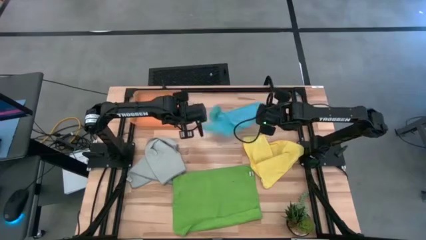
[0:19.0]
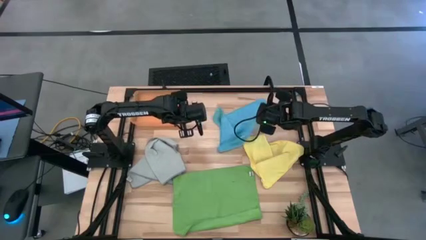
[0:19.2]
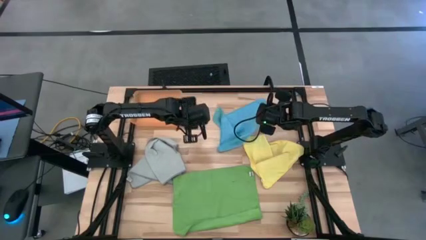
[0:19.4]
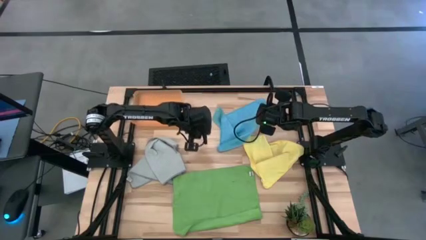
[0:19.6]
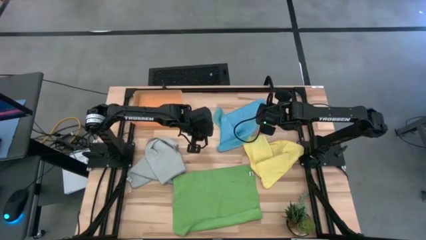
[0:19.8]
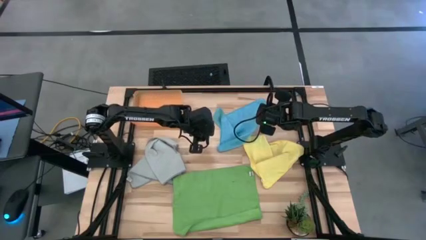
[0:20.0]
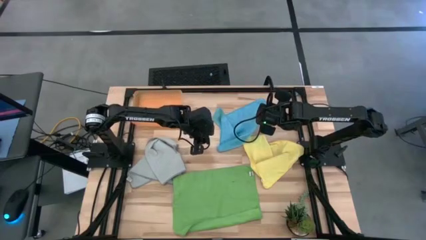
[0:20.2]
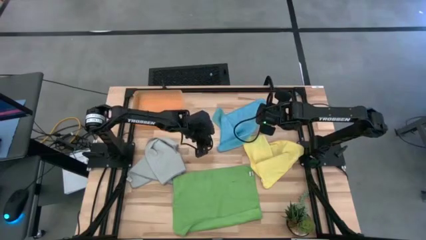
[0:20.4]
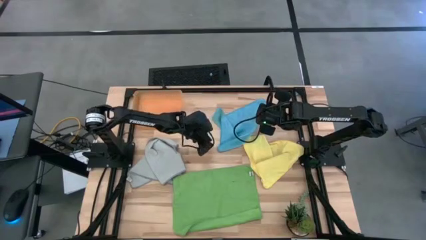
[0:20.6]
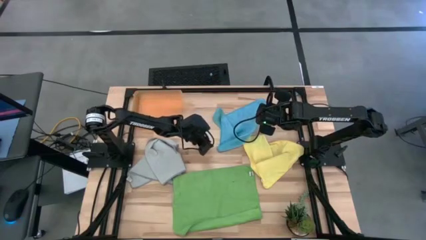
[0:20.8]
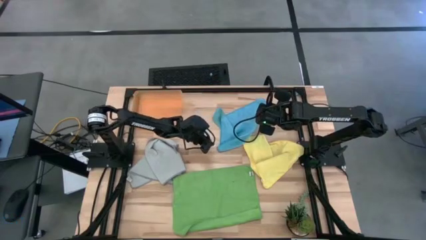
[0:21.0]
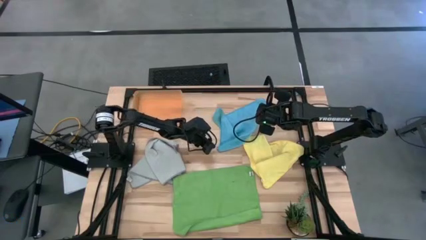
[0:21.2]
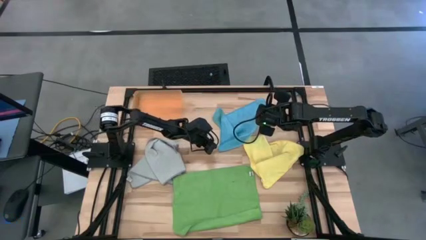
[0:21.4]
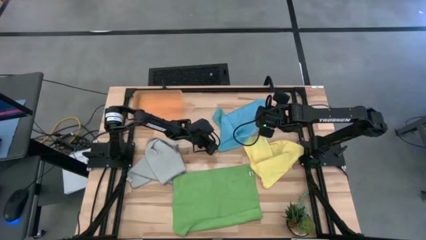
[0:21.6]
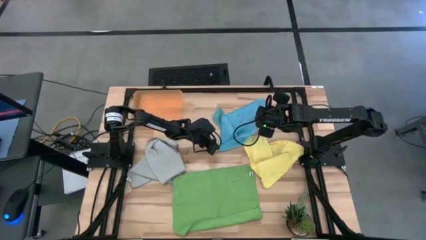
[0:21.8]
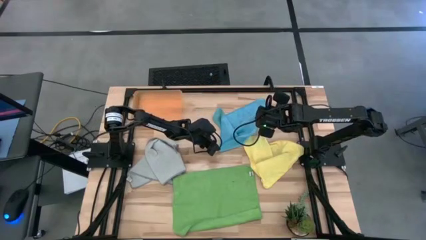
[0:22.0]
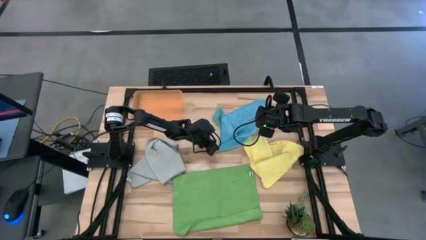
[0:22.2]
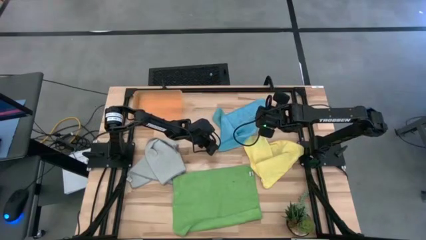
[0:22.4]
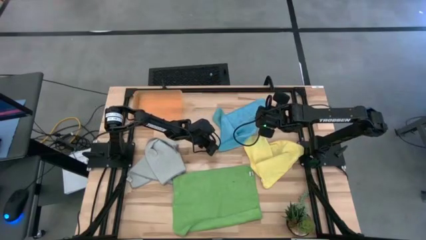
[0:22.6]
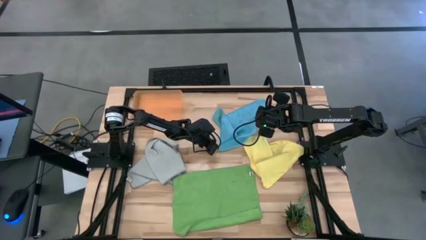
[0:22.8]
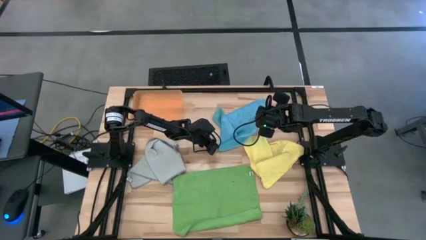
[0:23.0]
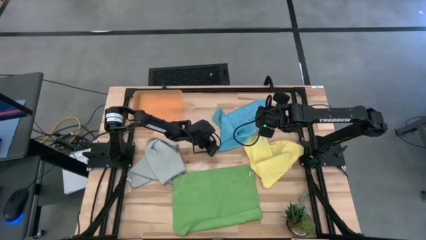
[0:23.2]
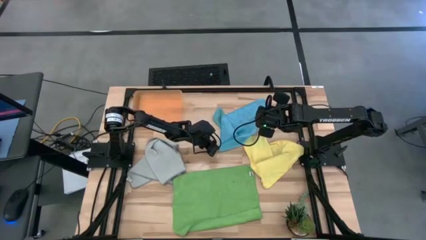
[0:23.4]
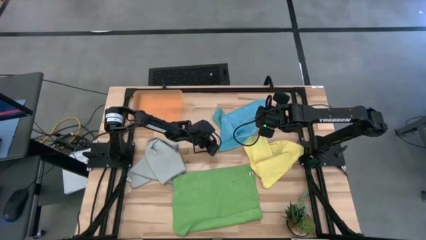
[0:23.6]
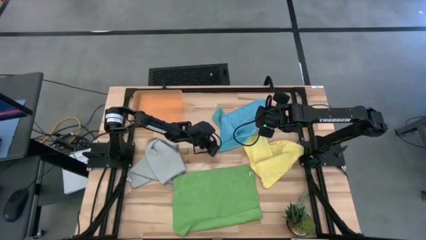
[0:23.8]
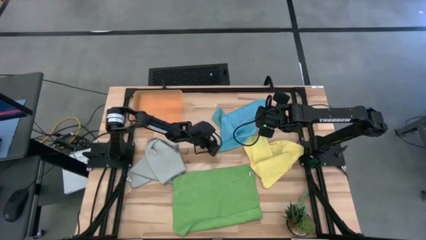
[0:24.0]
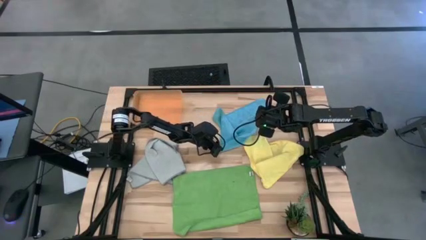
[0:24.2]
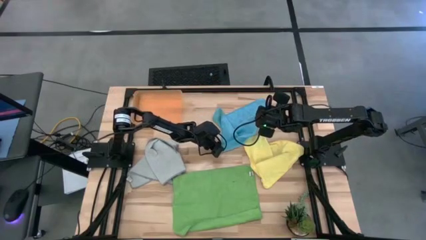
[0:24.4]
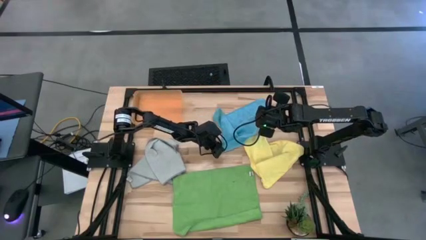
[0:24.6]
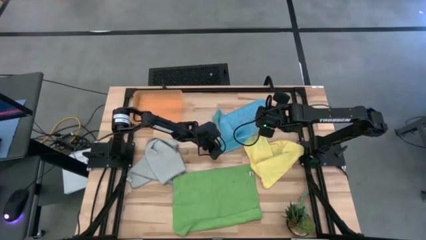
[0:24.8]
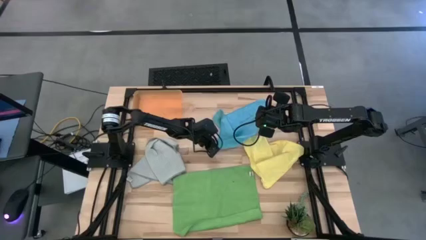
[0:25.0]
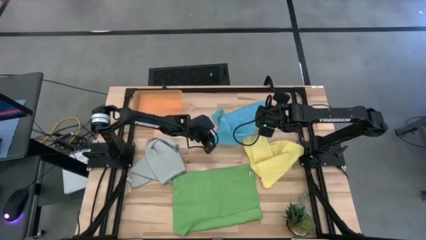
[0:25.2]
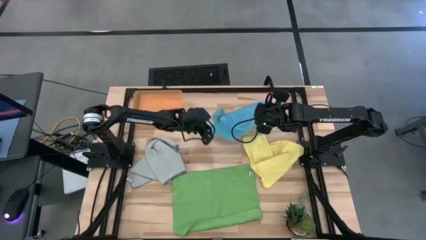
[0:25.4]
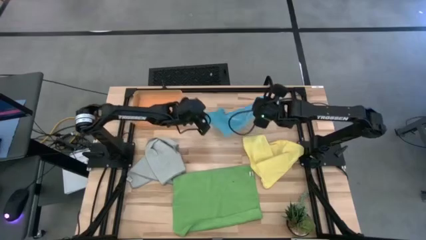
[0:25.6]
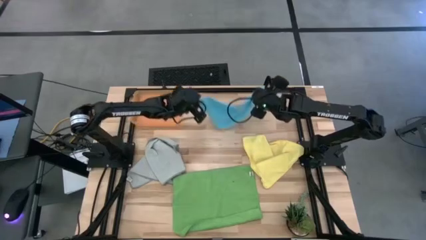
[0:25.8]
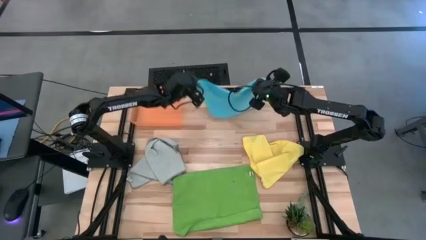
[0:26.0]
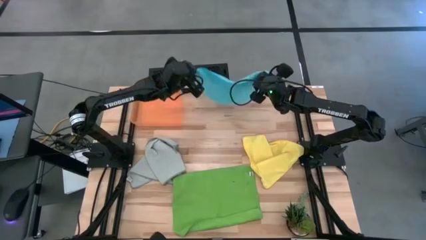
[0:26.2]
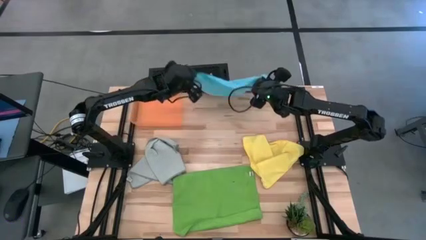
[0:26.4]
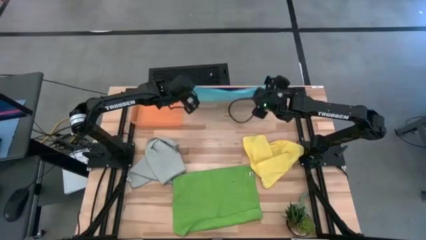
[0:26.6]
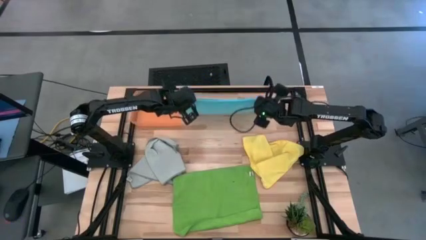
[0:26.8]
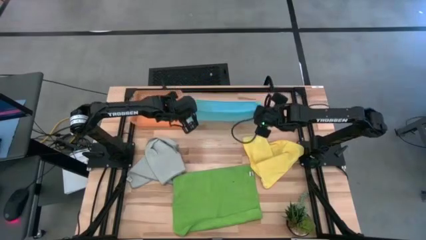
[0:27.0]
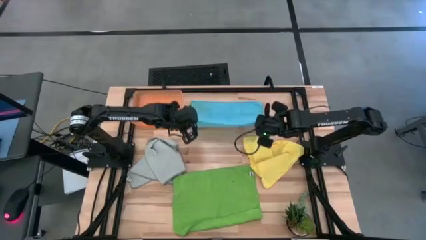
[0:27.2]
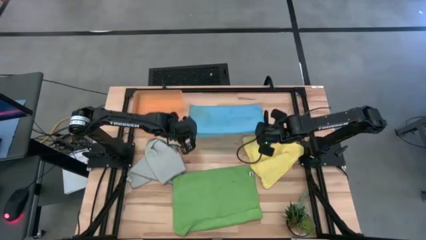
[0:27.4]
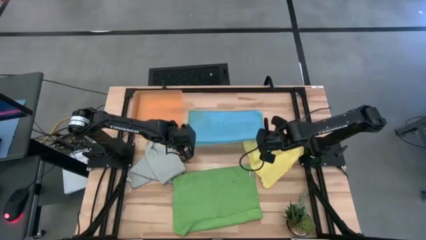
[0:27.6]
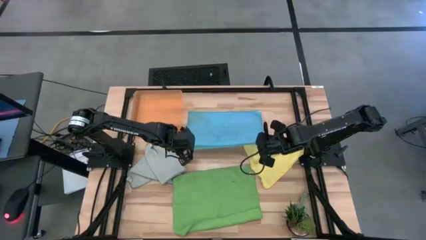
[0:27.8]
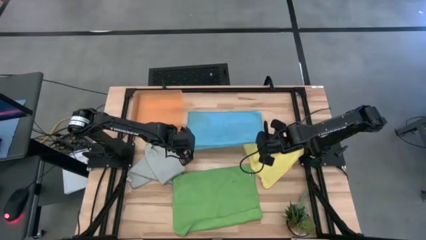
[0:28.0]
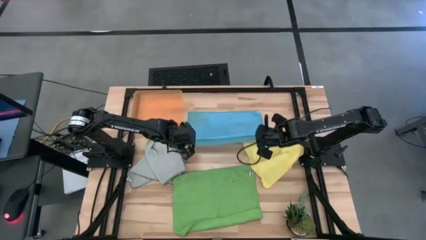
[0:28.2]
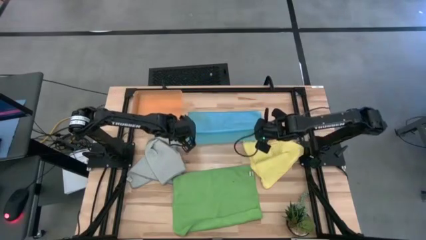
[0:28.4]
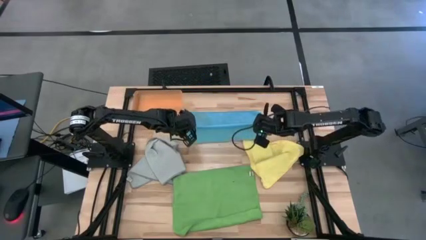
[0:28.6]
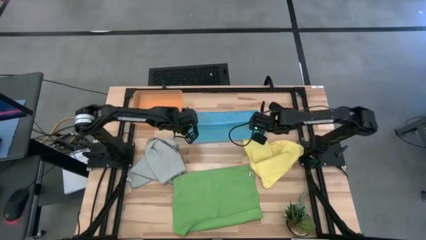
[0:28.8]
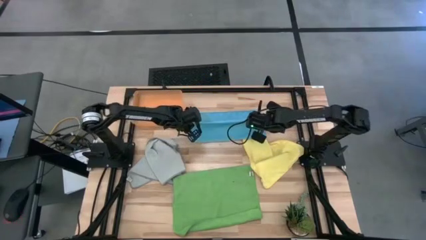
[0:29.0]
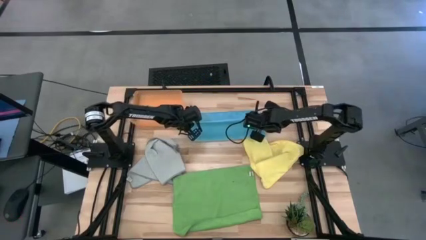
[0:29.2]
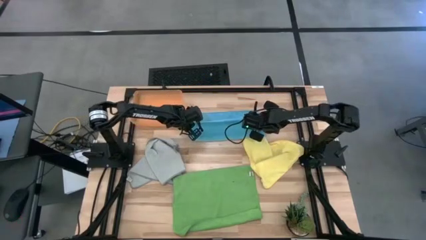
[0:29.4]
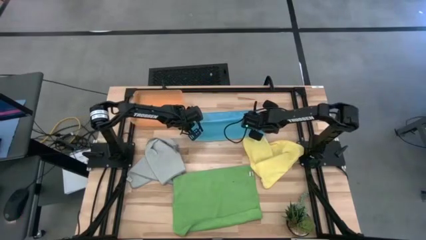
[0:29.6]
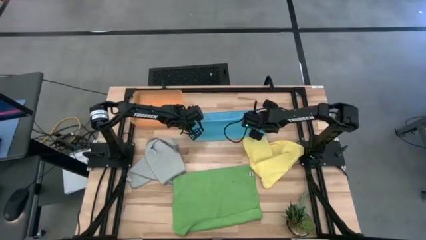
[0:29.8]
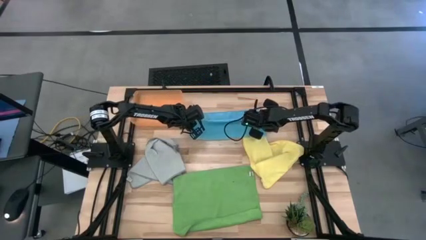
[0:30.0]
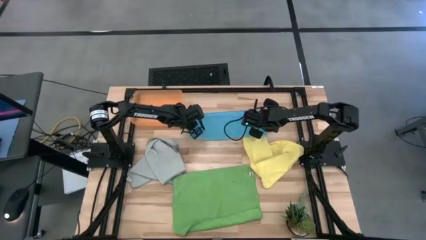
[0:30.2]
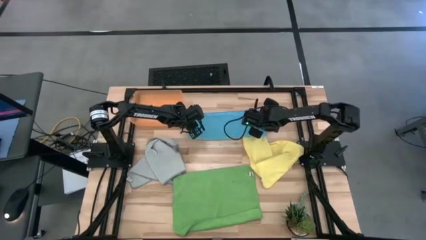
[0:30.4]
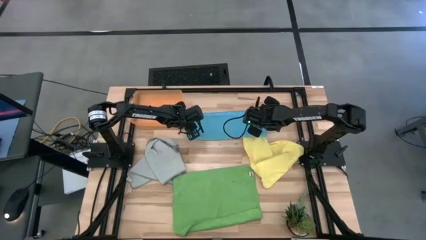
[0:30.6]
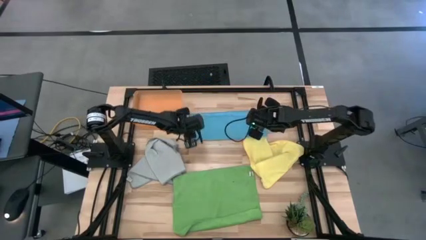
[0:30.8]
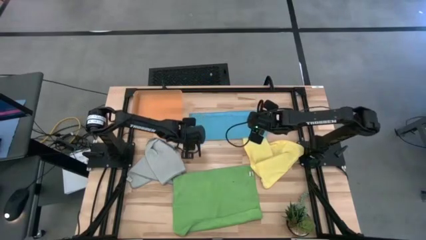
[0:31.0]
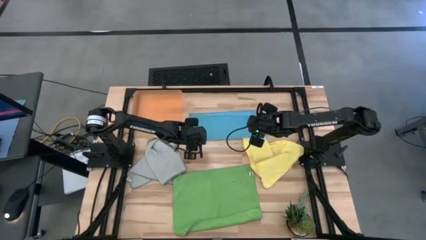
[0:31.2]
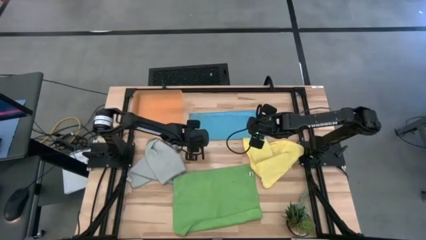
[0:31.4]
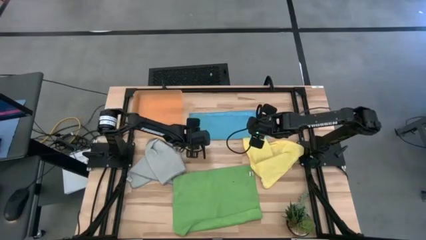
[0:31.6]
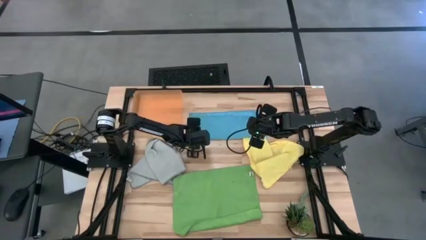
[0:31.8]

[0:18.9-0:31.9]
Task: Fold microfiber towels
Fold the blue microfiber cloth

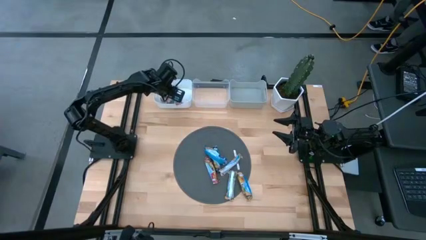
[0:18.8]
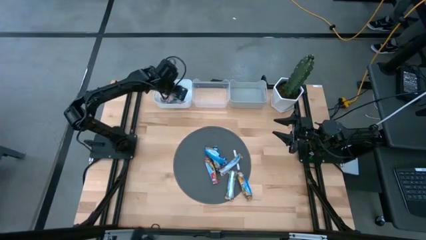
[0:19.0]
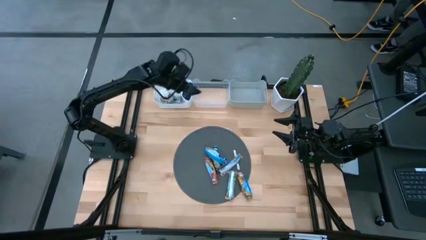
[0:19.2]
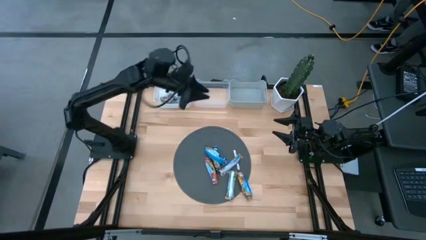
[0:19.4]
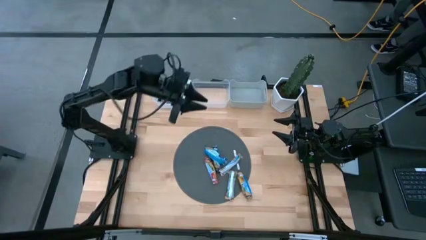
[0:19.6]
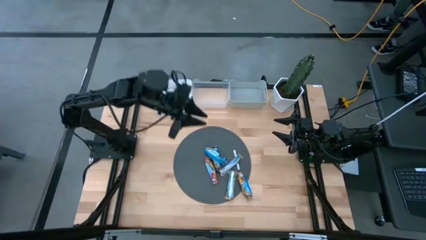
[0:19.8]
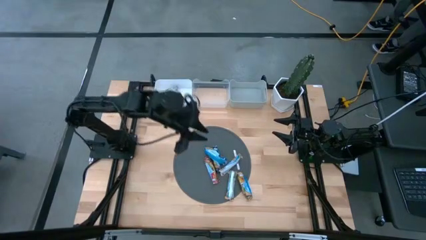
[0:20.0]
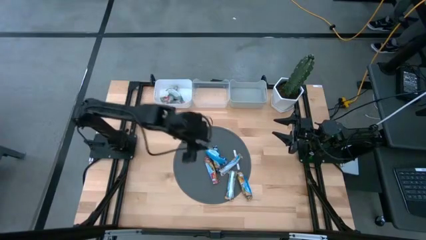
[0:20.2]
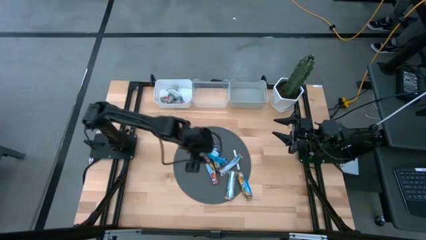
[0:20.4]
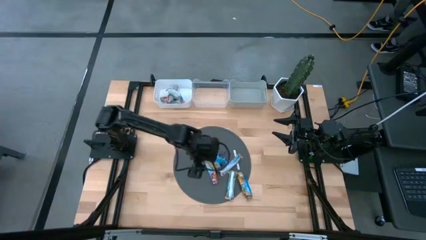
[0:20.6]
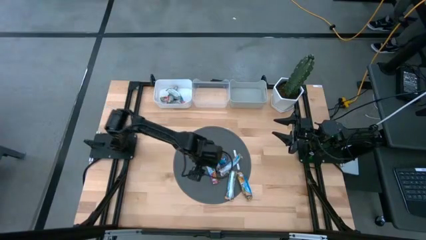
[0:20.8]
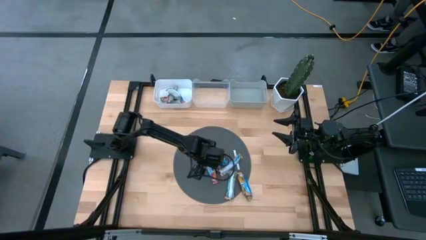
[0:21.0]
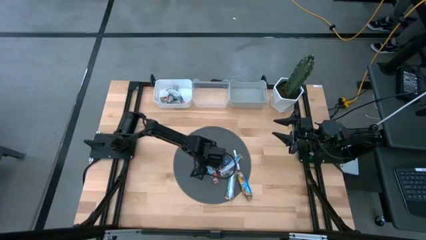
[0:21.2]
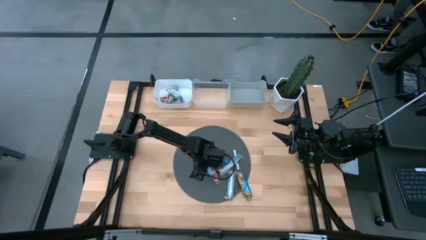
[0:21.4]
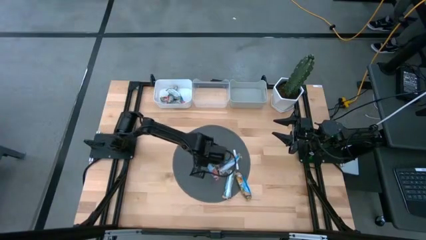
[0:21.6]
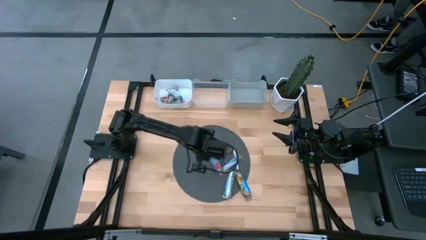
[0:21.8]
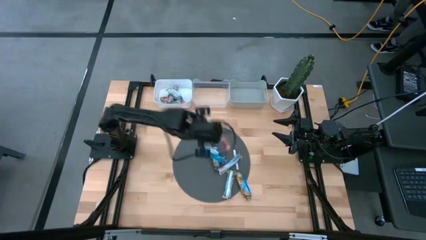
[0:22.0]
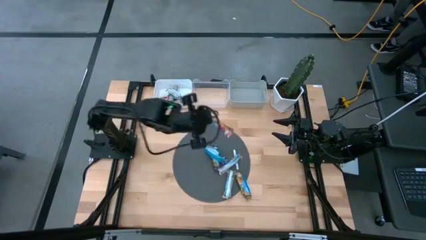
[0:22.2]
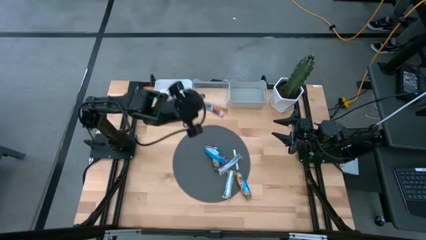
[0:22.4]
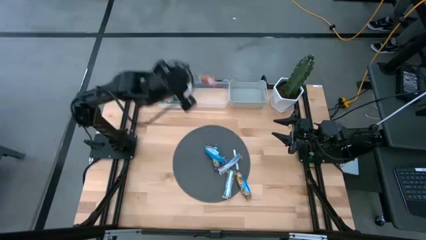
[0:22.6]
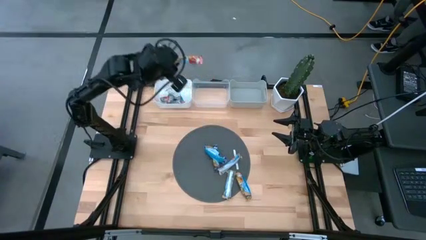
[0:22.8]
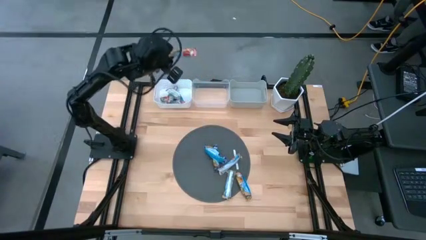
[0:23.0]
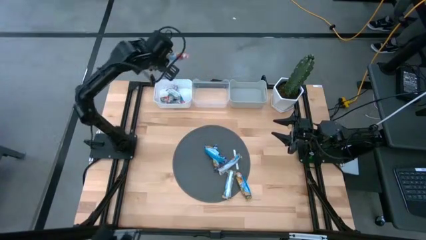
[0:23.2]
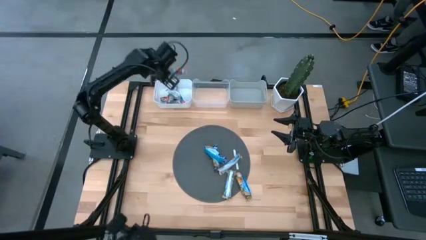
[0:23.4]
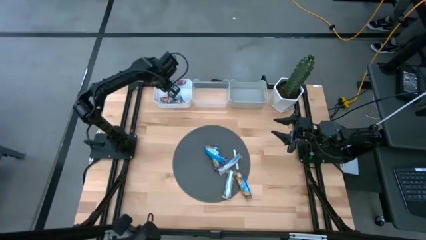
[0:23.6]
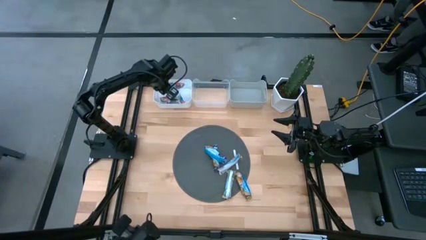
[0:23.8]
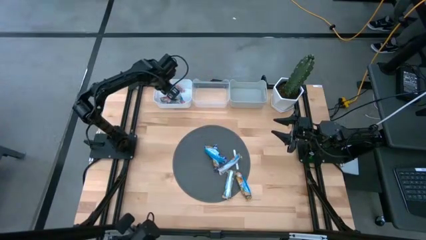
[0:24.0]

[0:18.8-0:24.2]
Task: Pick and place Granola Bars by type
Put the red granola bar into the white bin
